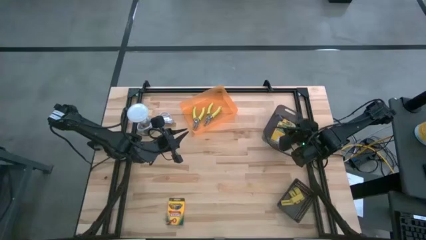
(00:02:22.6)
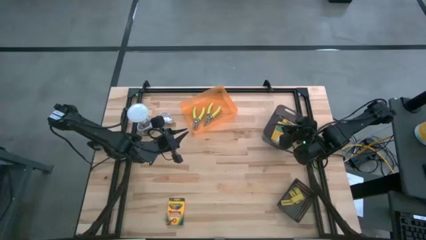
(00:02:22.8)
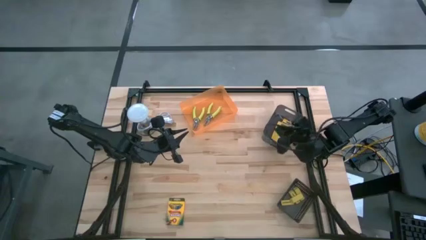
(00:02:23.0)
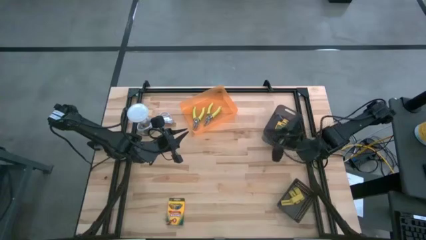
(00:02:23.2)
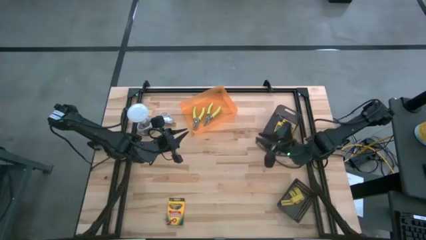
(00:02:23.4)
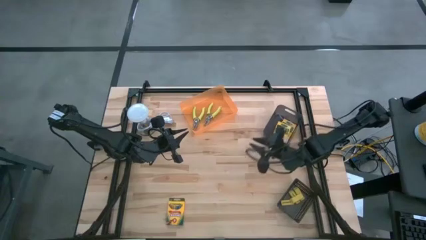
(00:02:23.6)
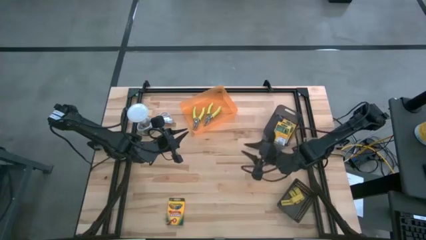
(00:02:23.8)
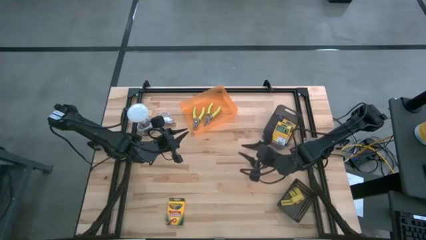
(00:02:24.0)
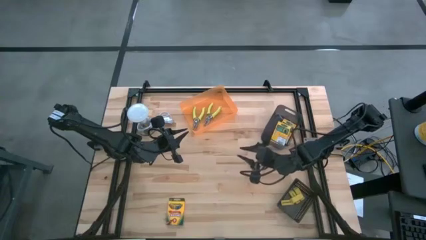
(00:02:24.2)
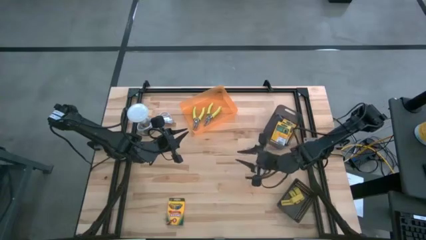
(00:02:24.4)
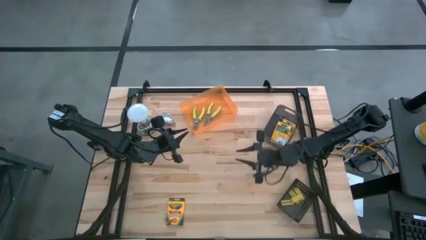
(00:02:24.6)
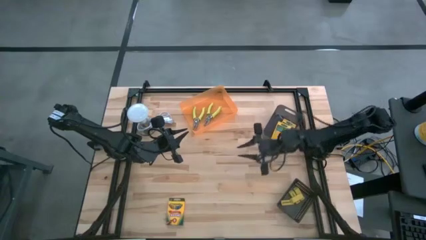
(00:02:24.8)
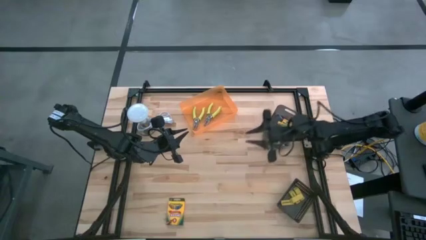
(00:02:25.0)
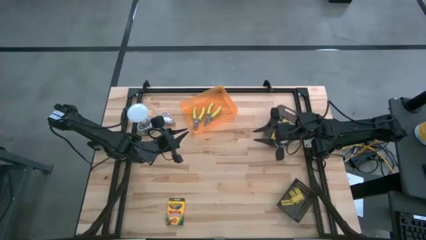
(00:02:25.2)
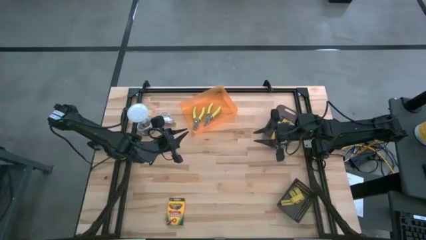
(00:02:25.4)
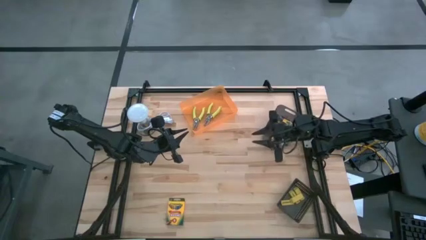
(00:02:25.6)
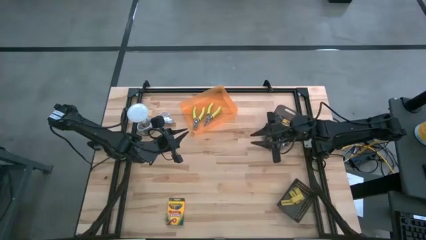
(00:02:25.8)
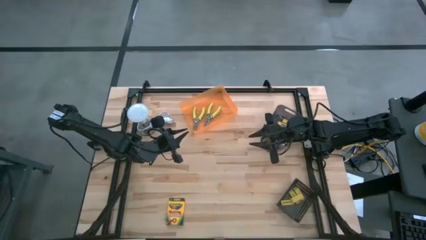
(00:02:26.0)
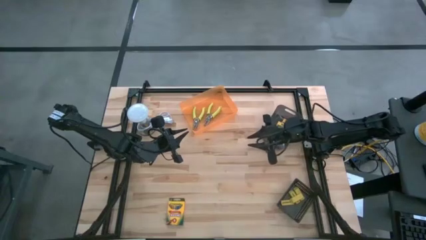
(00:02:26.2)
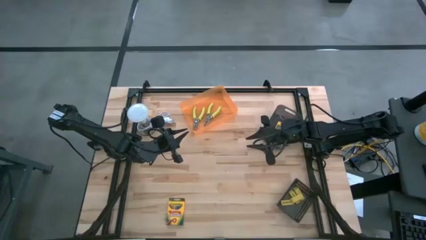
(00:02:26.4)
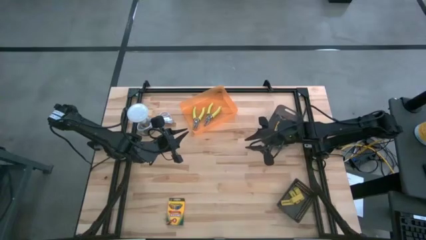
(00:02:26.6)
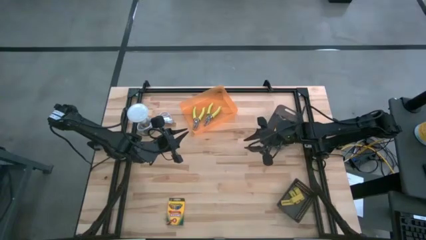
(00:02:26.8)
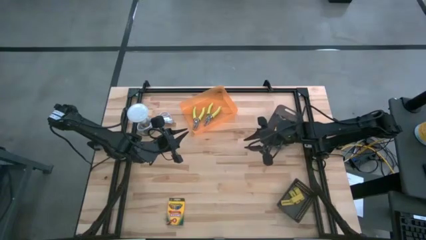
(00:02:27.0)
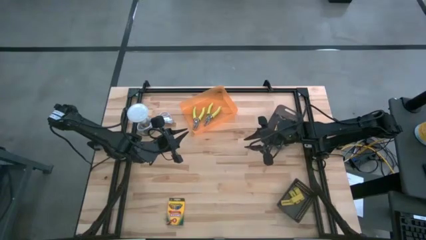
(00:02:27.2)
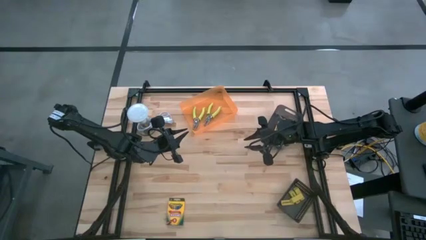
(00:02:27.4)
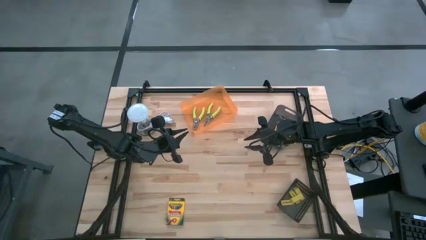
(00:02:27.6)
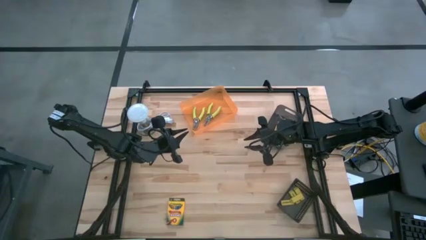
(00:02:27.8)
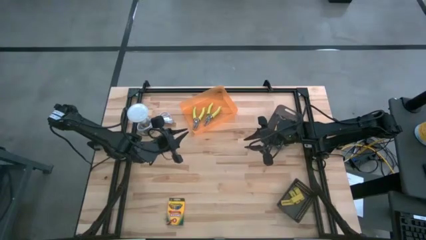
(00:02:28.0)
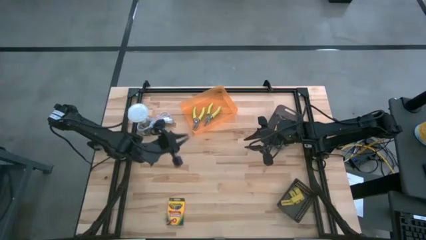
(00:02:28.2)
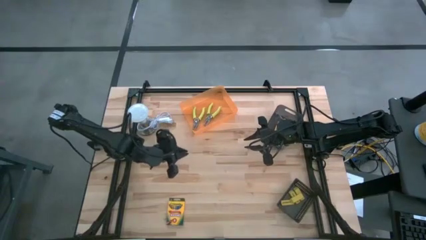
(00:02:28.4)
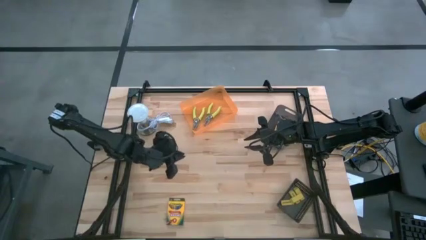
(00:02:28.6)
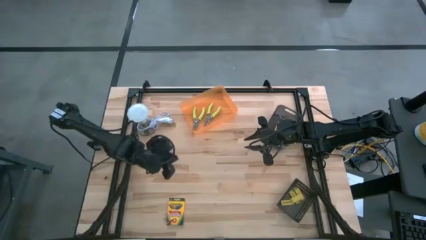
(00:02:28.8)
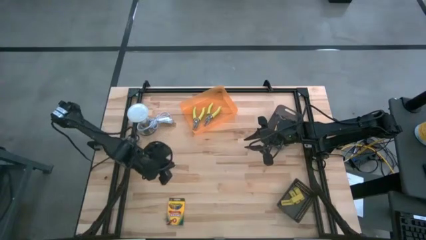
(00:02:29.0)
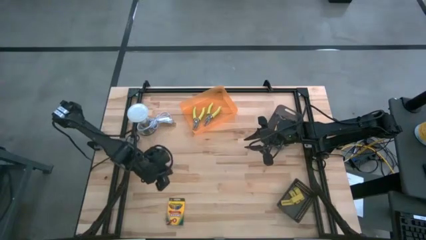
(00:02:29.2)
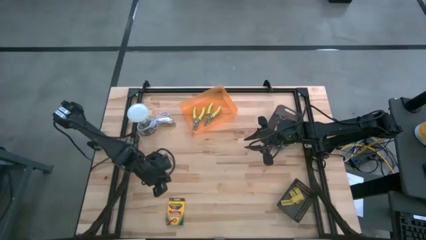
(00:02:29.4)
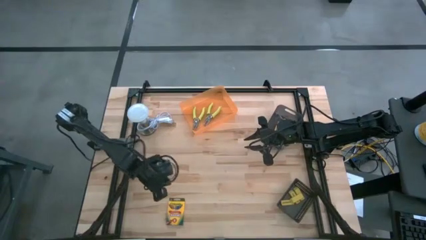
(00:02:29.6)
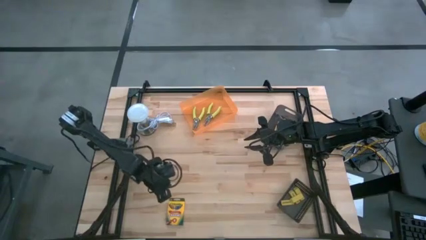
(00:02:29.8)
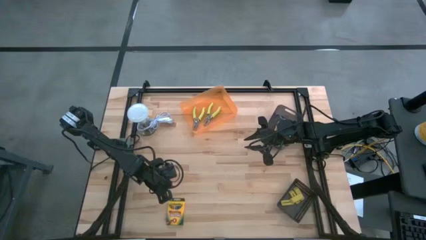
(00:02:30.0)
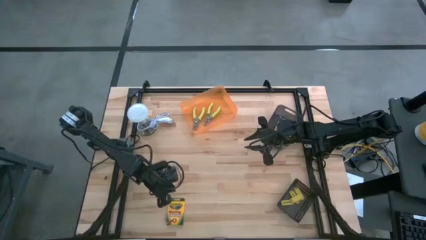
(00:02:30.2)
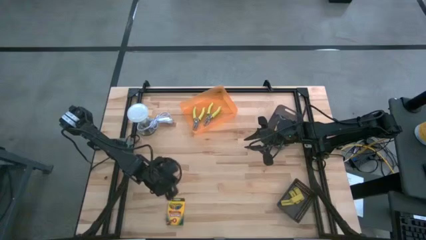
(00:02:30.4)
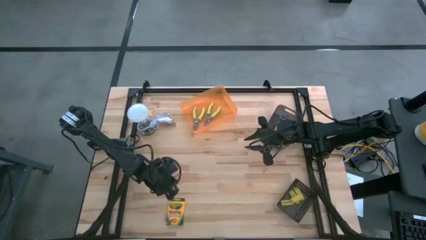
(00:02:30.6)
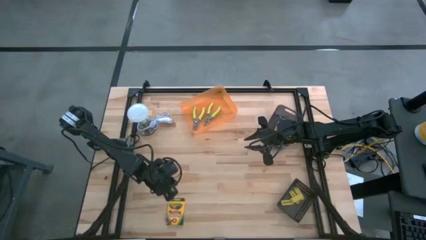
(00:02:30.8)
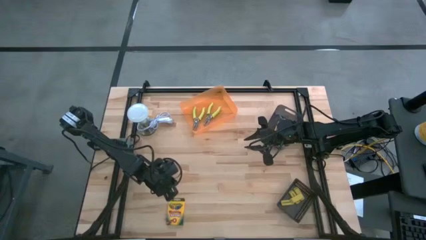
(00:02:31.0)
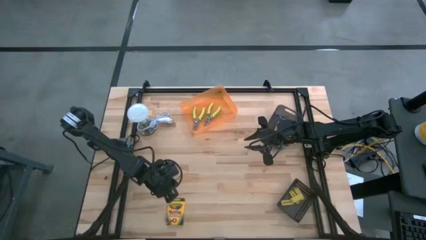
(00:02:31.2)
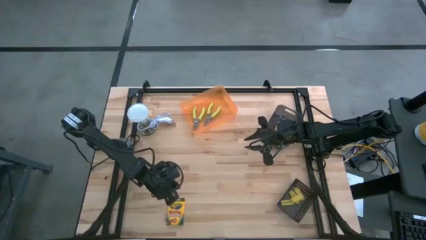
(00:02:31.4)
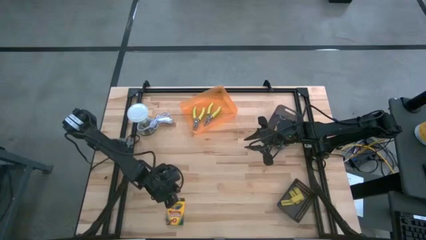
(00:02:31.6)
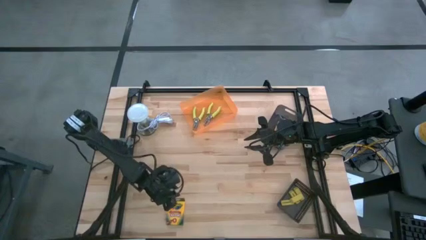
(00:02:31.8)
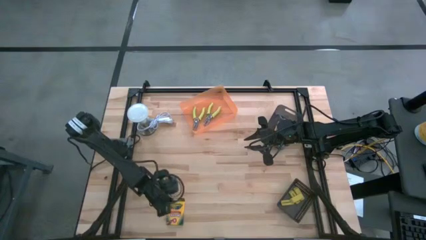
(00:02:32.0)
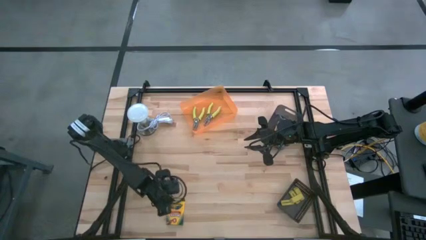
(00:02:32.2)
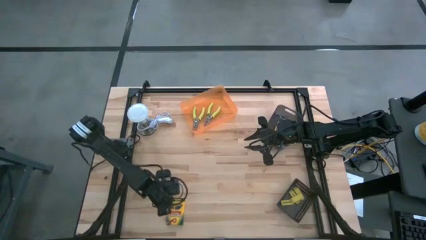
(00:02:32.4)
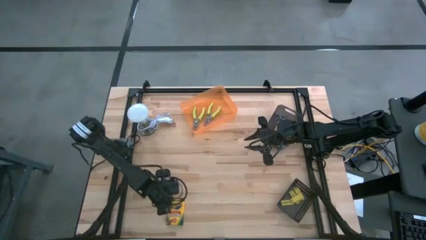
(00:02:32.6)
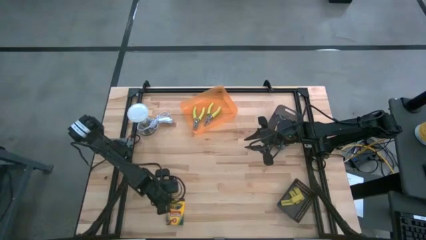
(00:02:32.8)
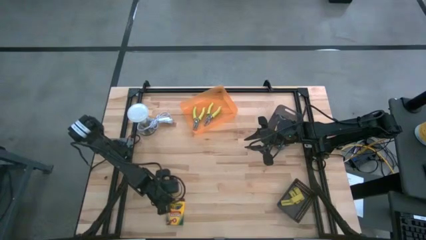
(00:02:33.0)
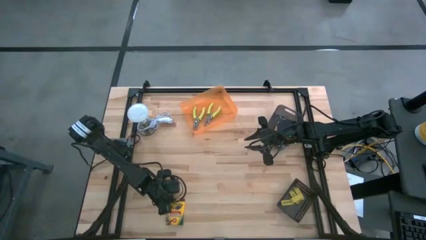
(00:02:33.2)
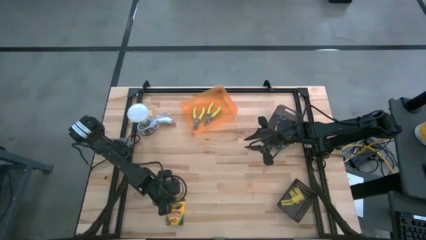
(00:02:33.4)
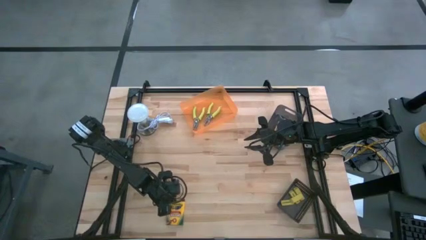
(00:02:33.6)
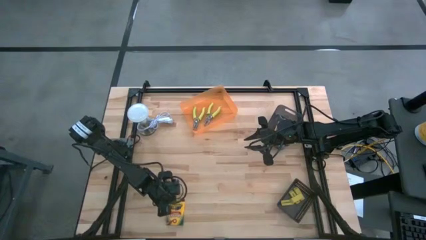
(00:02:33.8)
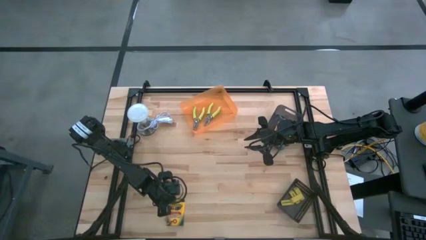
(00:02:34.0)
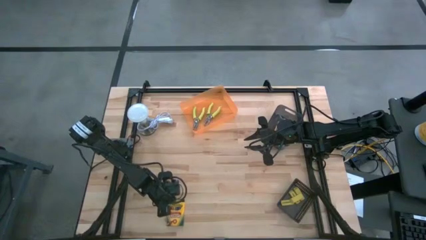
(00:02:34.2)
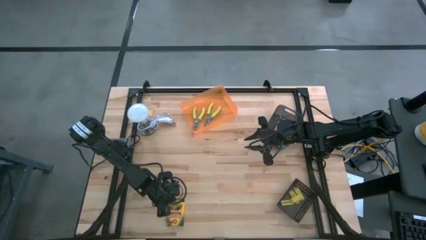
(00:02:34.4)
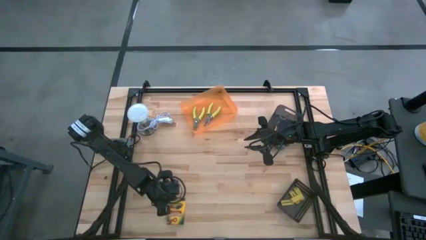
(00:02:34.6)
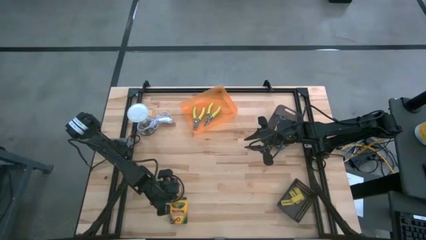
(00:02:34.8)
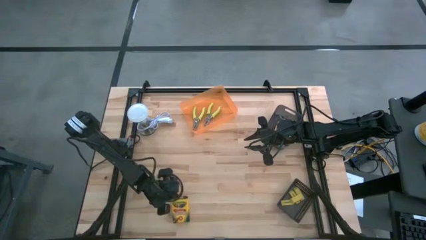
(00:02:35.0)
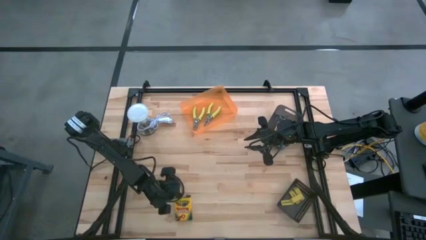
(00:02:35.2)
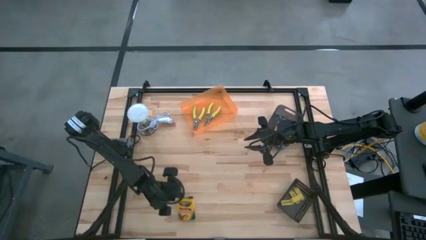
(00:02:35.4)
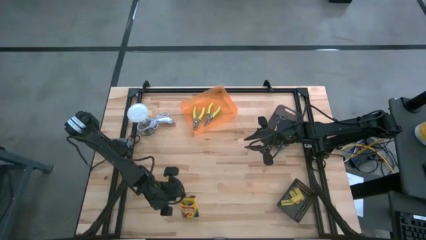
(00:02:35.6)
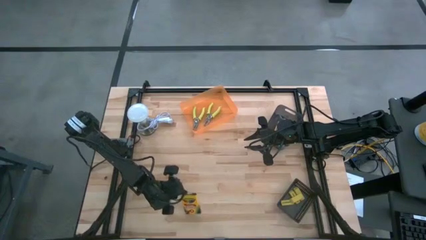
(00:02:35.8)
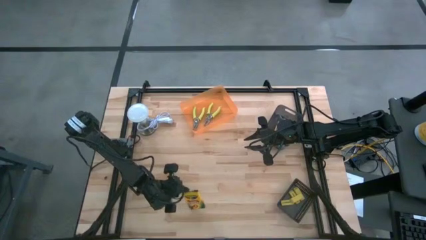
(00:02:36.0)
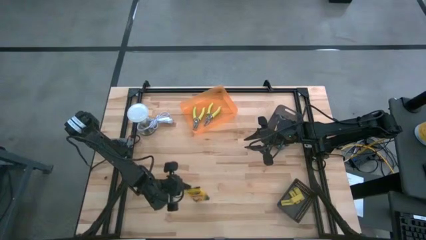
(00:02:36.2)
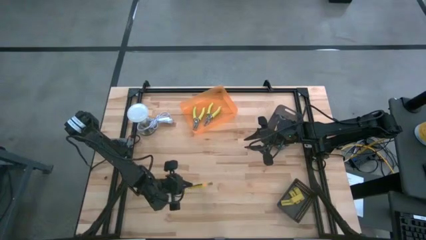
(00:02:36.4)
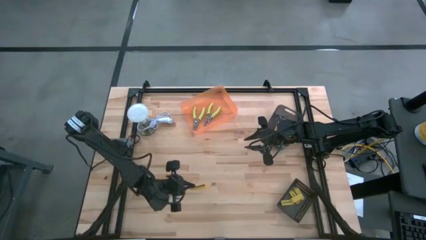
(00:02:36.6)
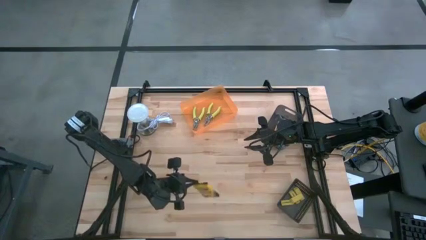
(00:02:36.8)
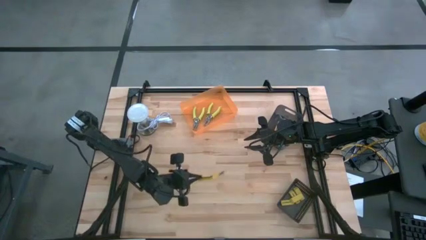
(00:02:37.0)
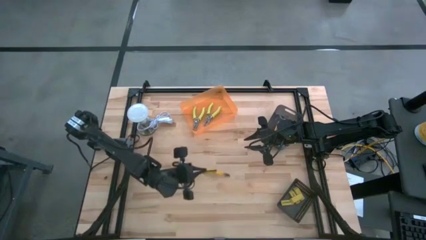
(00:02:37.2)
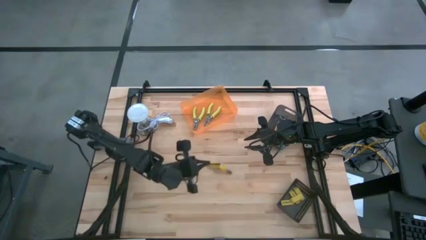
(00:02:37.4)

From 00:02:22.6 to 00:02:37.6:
Task: Pick & Place School Supplies
Put the crayon box into the light black bin

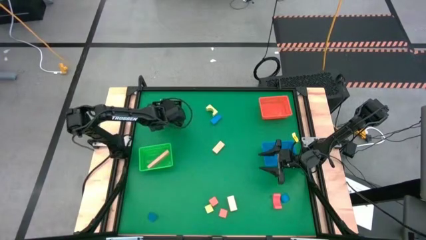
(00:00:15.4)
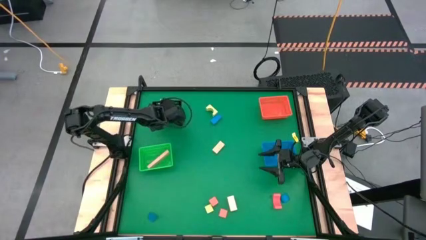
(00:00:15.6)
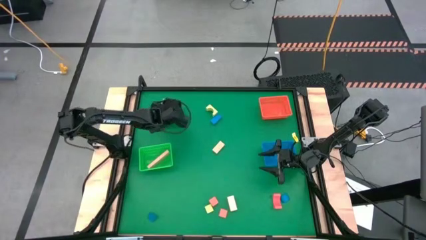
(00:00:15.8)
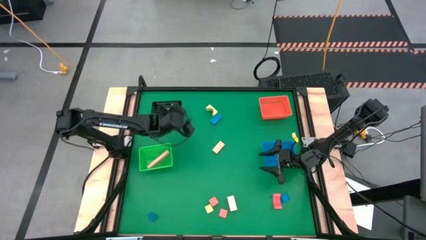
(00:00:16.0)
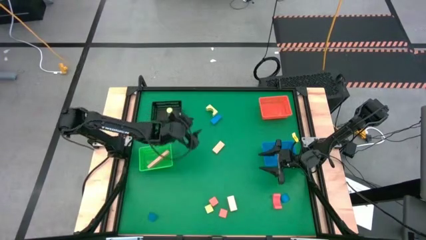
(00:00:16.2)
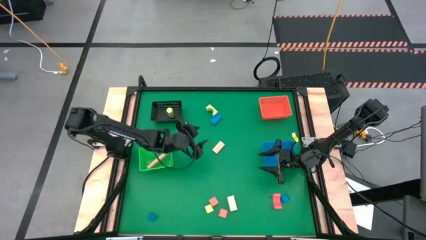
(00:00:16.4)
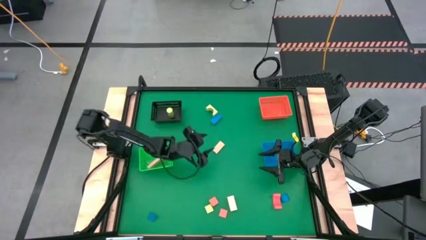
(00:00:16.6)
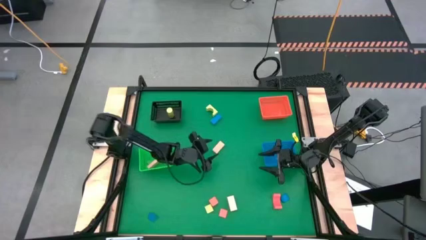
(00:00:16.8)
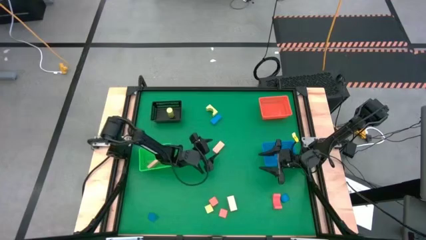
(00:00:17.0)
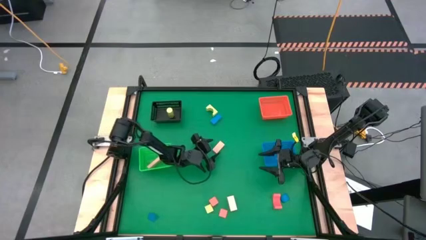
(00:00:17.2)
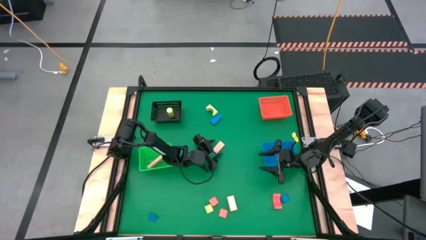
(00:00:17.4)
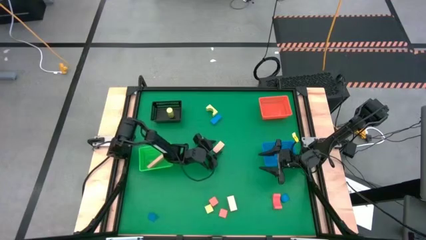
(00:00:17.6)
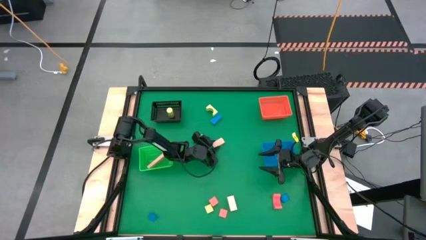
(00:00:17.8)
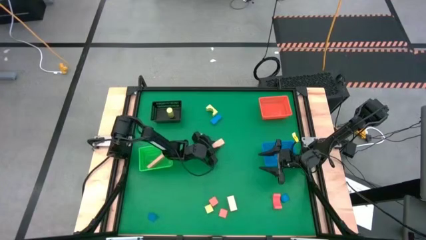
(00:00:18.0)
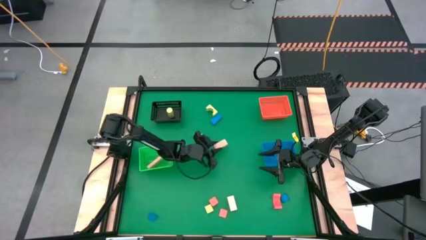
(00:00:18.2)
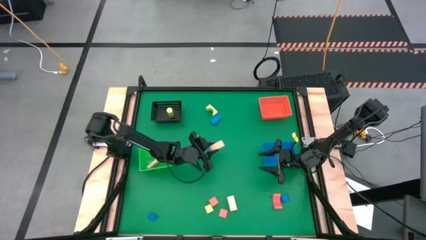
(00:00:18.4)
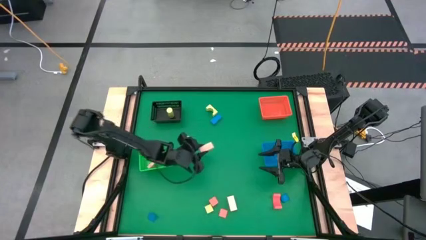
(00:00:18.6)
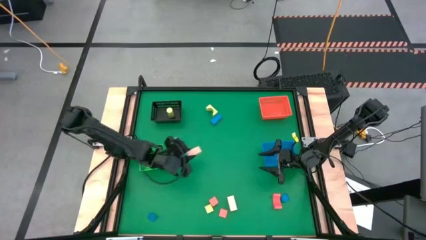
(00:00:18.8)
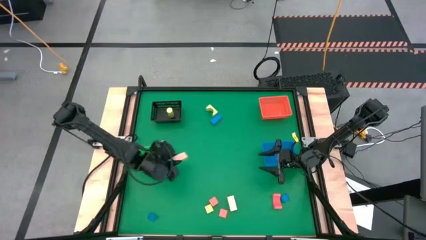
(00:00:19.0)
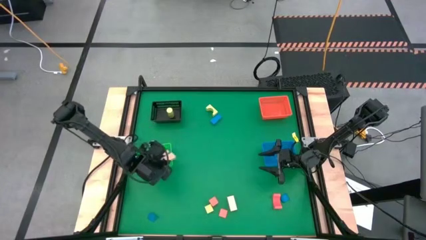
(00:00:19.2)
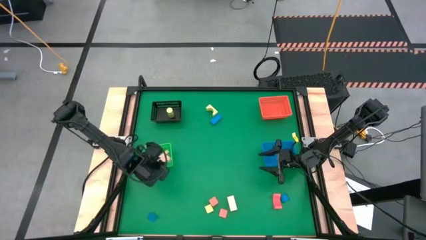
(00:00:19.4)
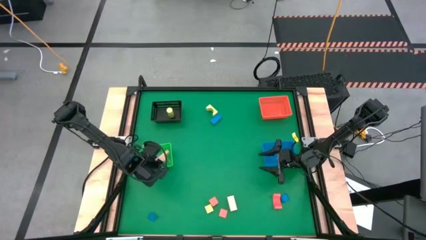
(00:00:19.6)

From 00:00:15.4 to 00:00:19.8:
Task: Sort & place blocks by color
Put the light brown block into the green bin
